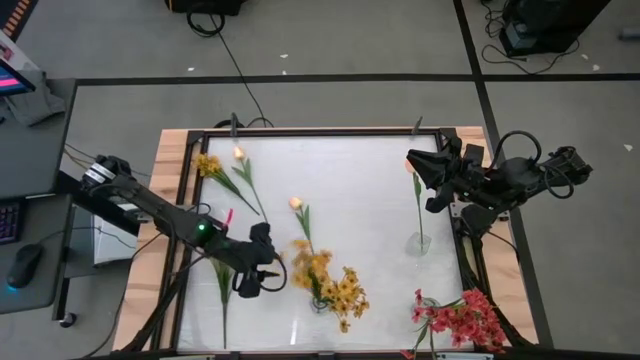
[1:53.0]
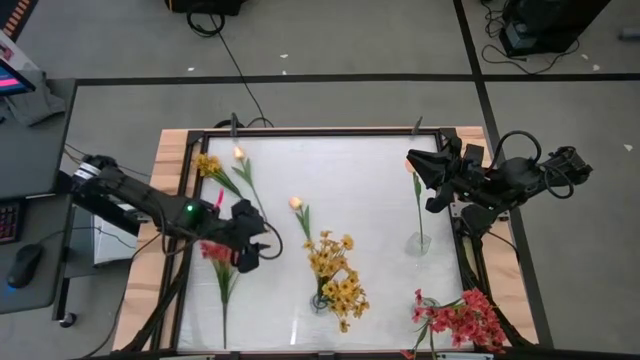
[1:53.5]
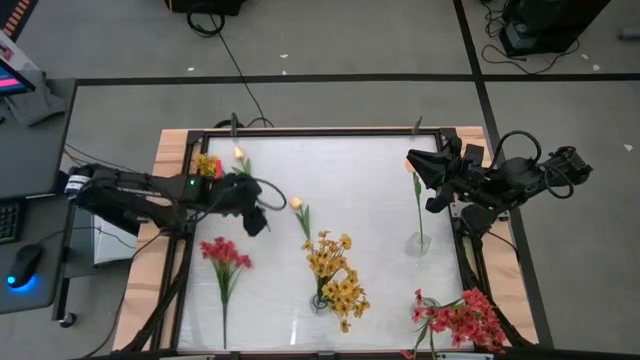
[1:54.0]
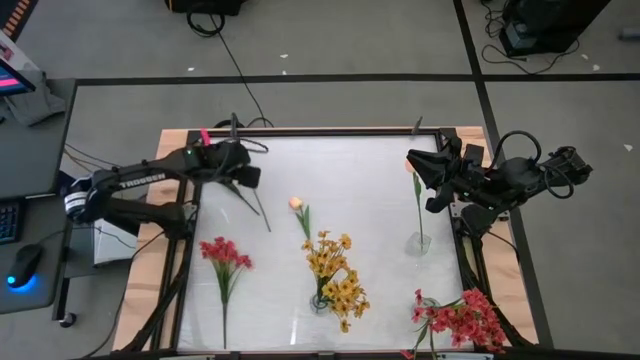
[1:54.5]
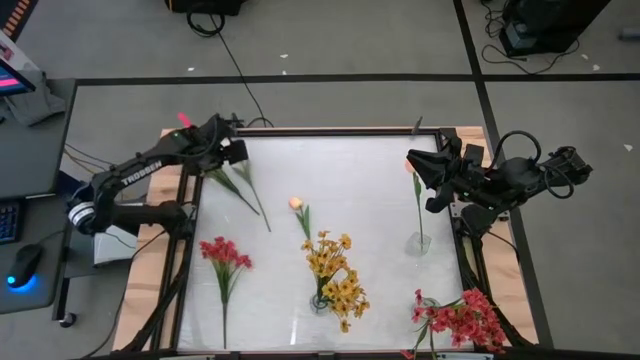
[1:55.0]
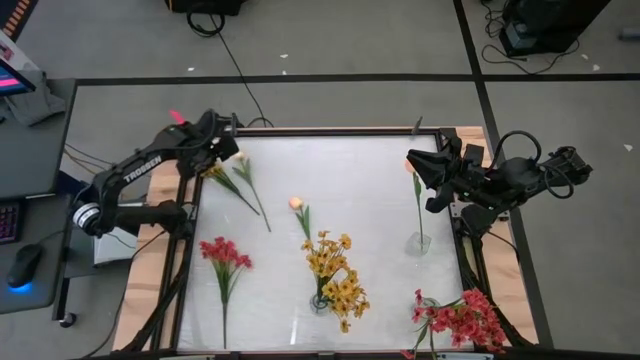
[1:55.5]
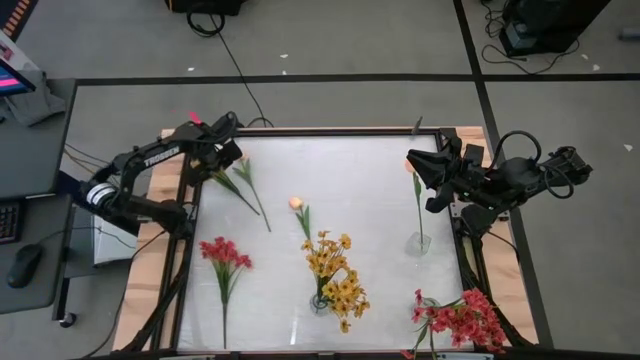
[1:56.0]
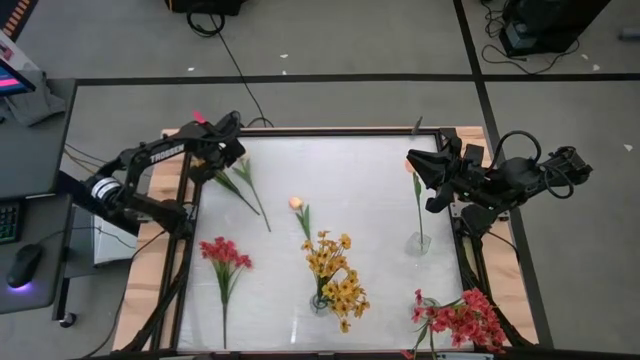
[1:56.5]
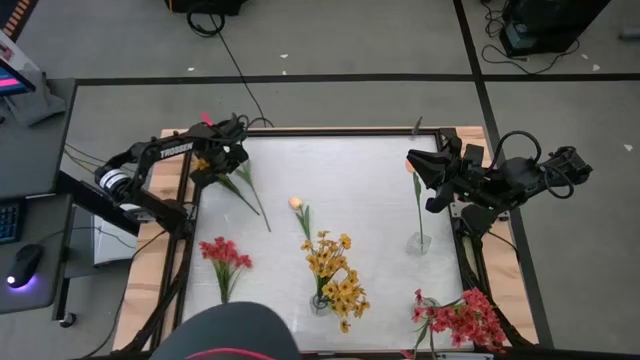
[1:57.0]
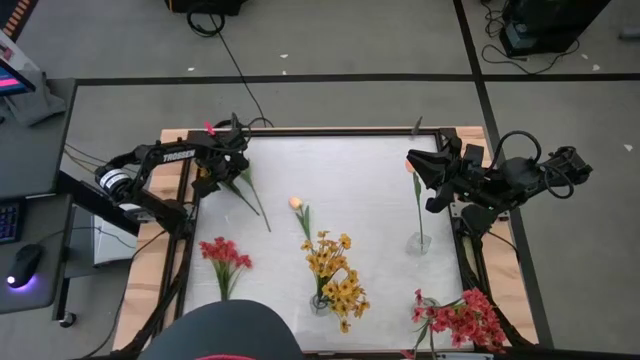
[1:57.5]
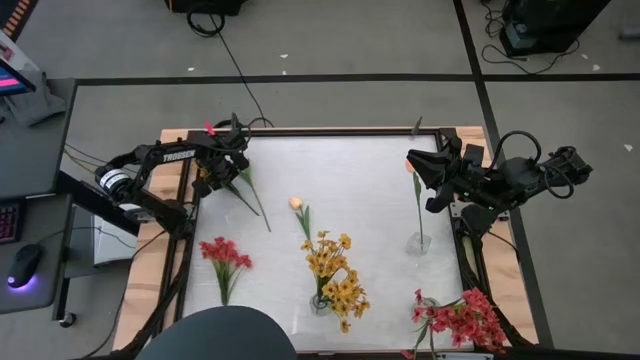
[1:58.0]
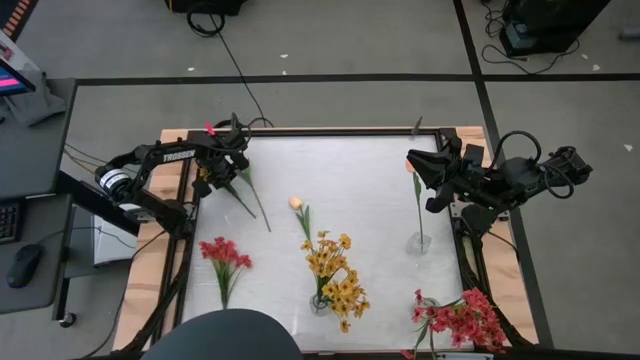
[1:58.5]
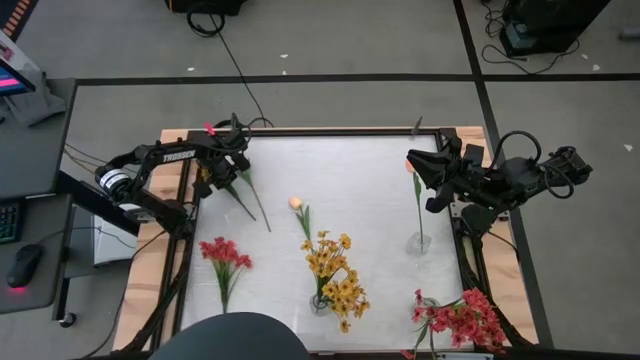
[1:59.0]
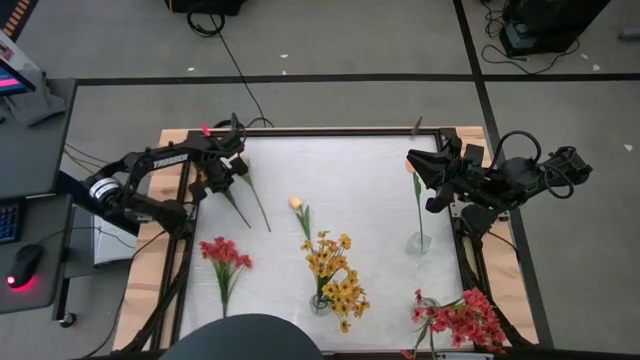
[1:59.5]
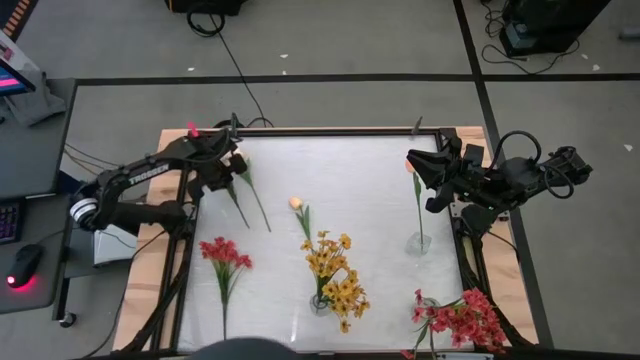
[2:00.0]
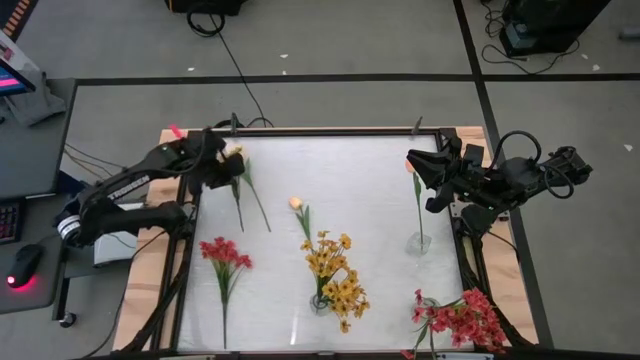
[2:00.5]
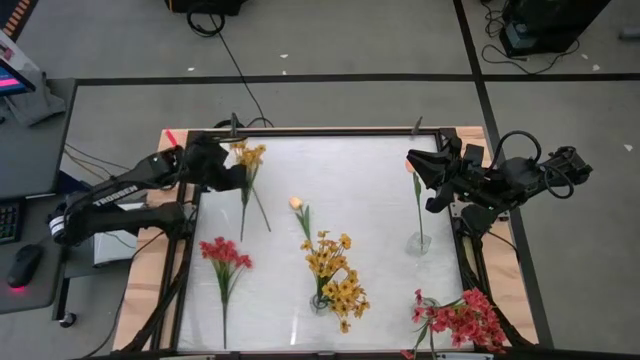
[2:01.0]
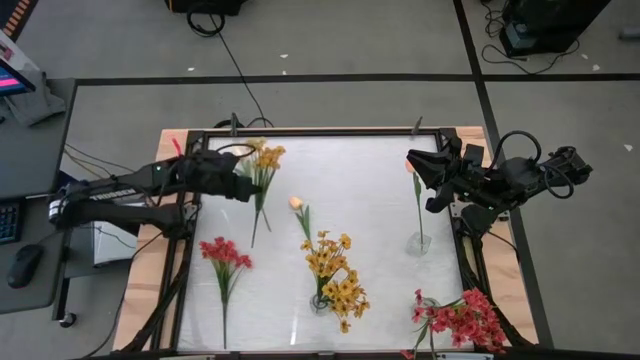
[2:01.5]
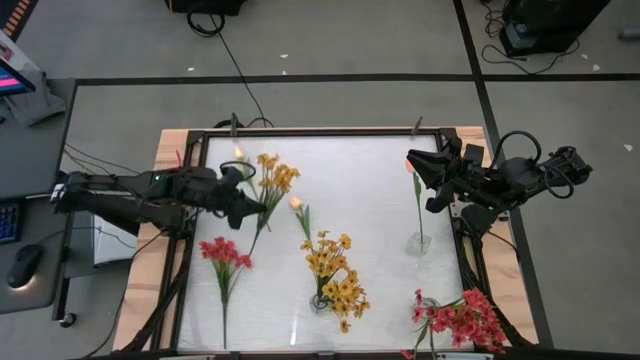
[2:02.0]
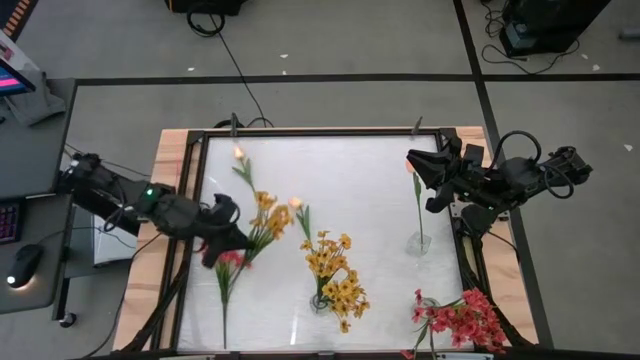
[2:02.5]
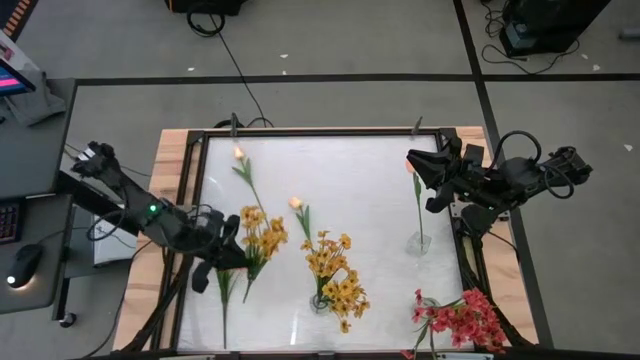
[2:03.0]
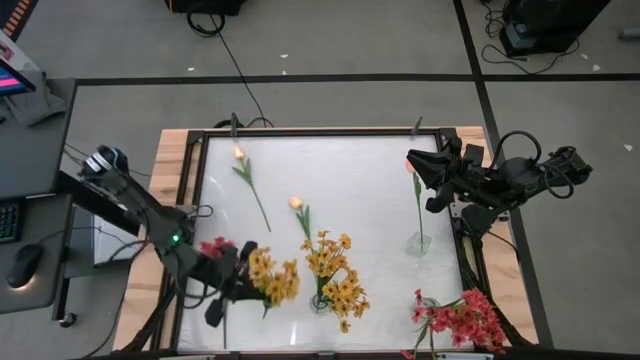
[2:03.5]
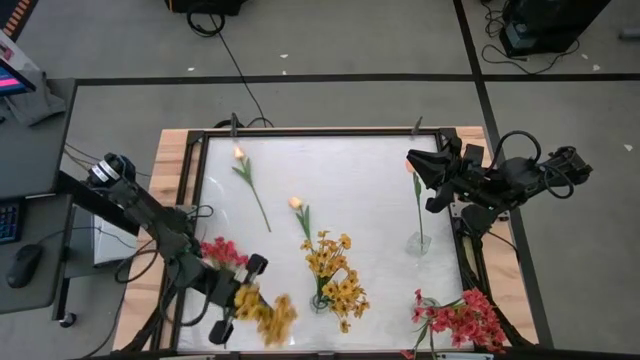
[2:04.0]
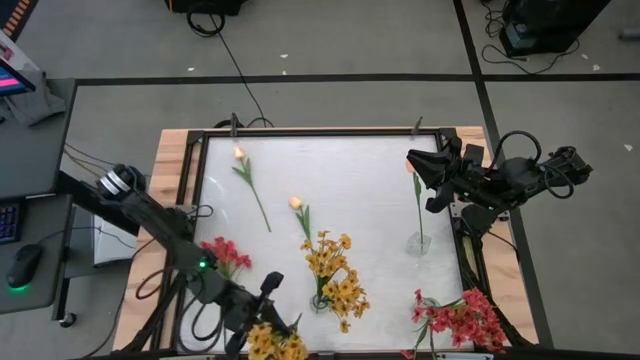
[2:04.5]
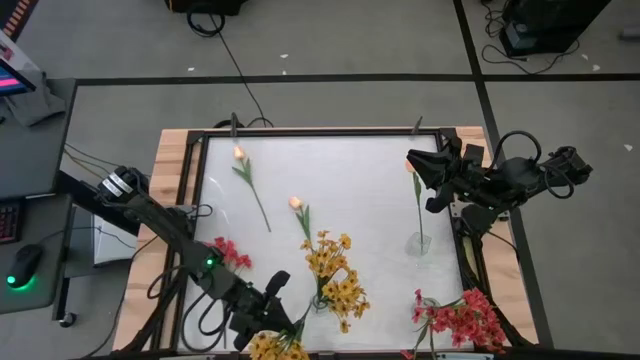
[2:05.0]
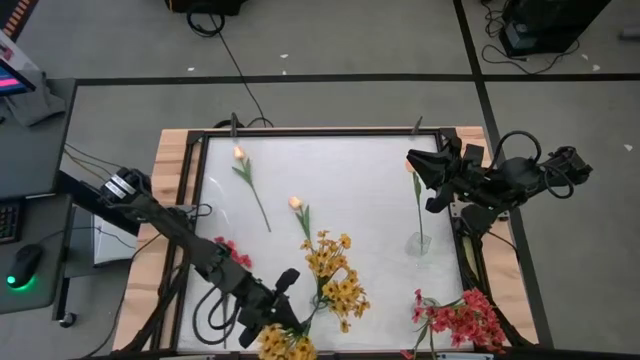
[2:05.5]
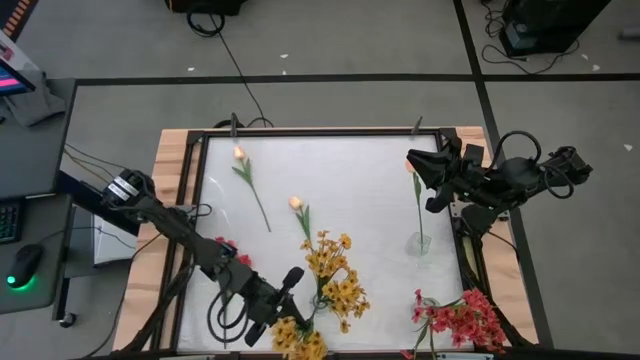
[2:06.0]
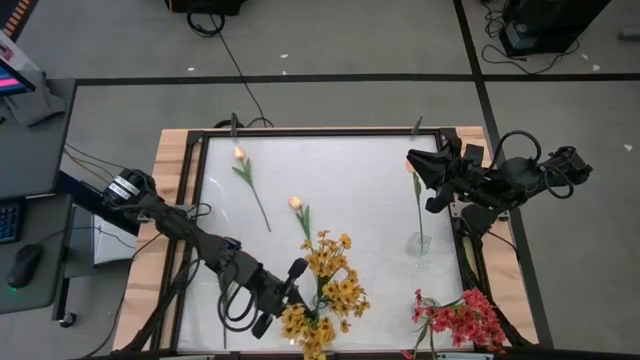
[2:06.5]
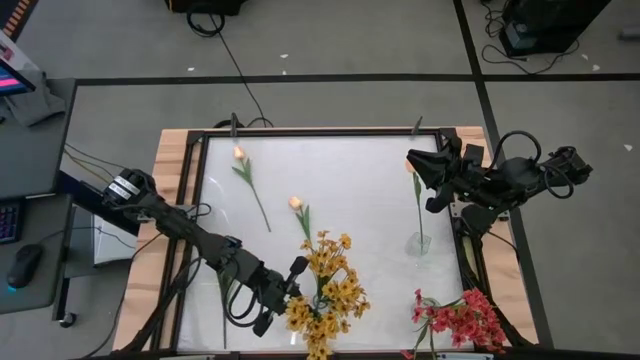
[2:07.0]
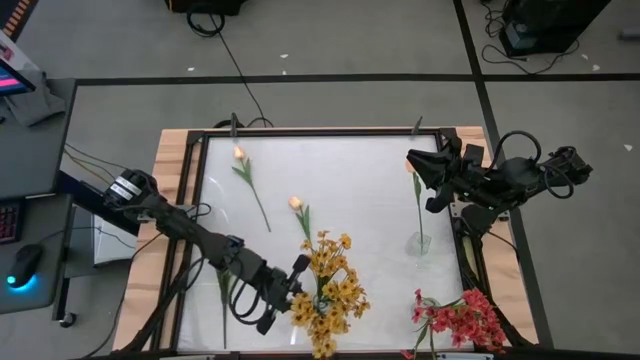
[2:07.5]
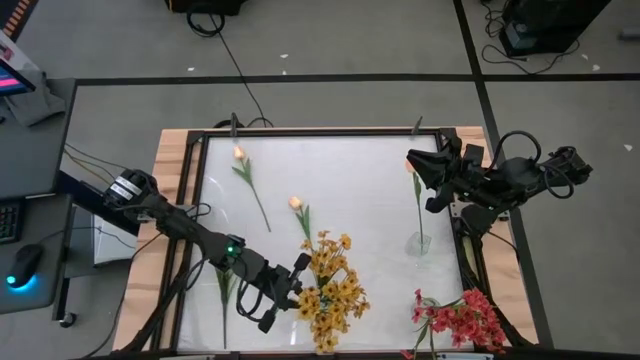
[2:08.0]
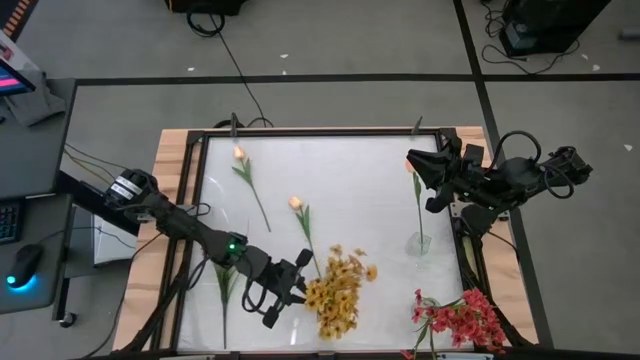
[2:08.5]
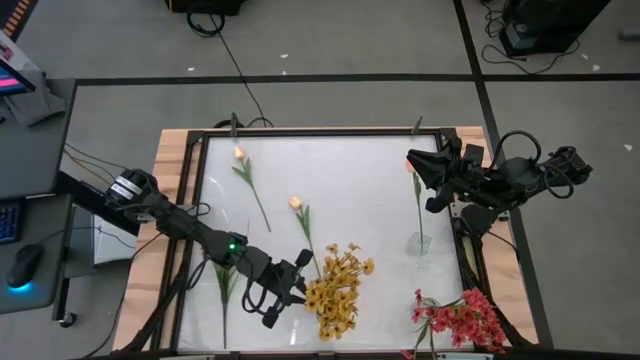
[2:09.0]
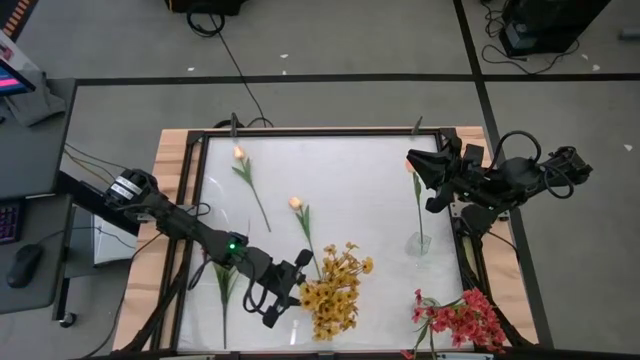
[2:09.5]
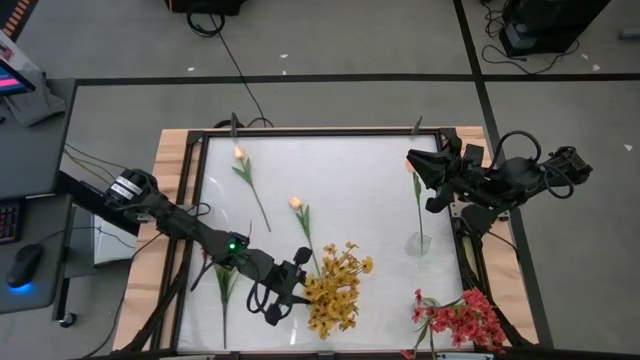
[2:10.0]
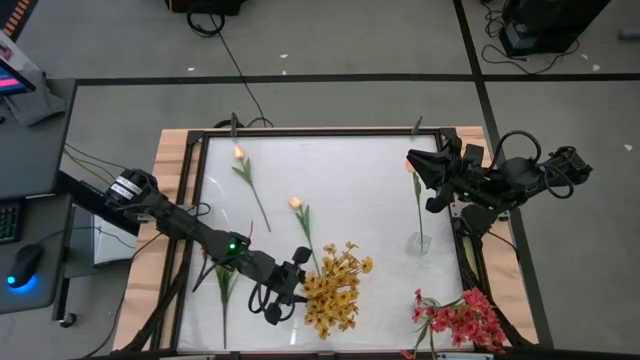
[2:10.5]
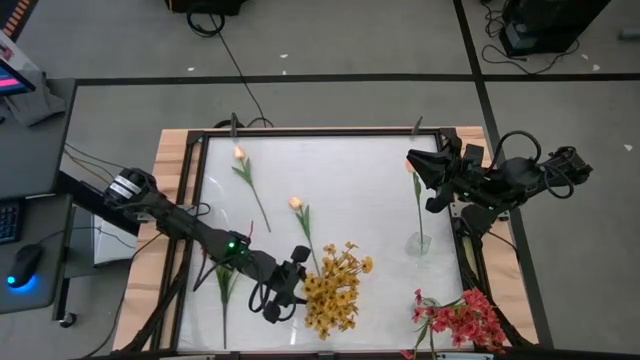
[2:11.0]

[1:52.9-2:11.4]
Task: Sort flowers into vase by color
Put the yellow flower into the left transparent vase

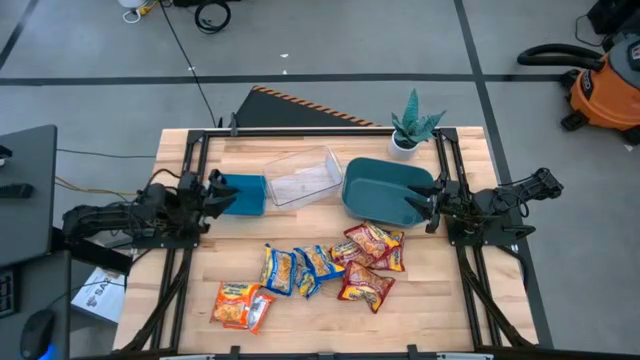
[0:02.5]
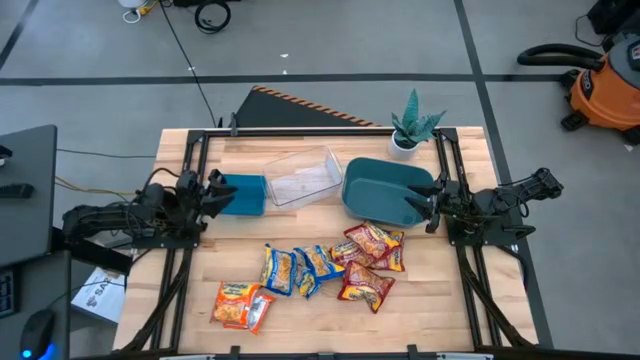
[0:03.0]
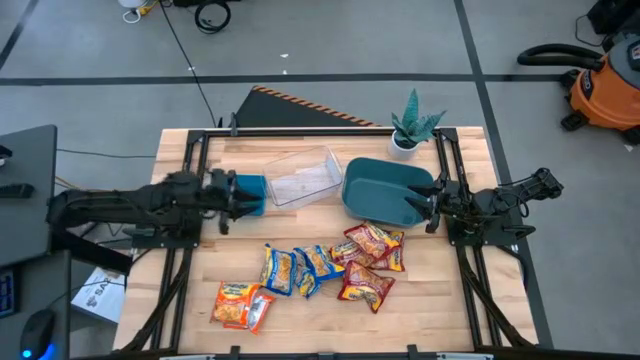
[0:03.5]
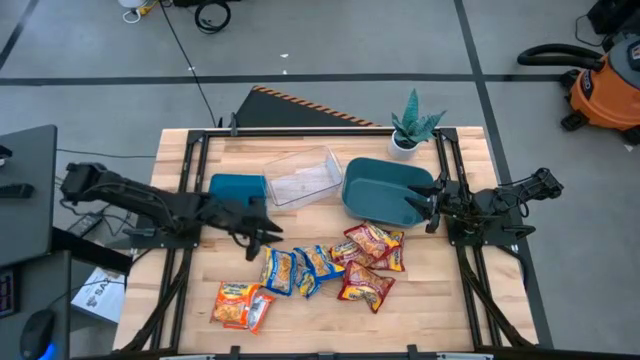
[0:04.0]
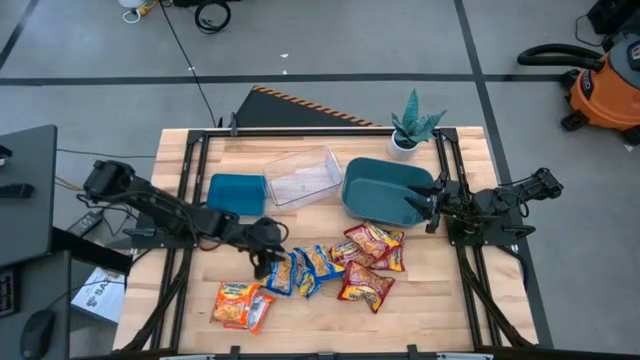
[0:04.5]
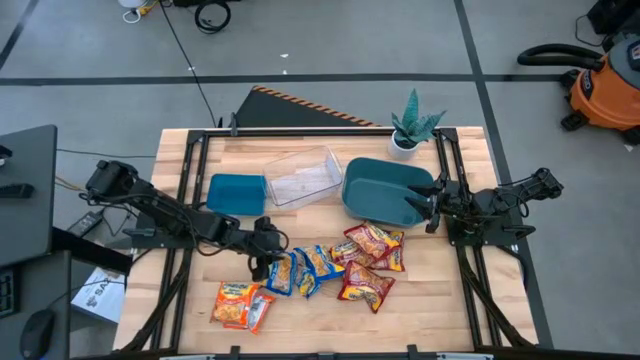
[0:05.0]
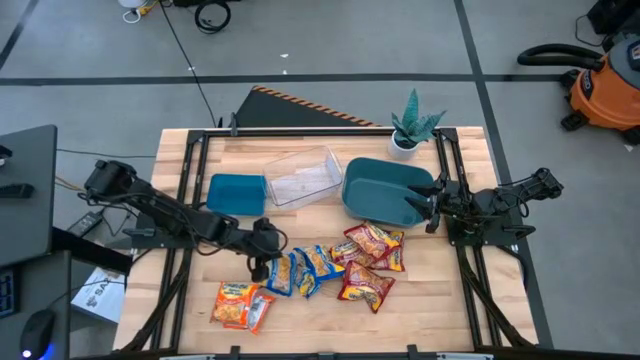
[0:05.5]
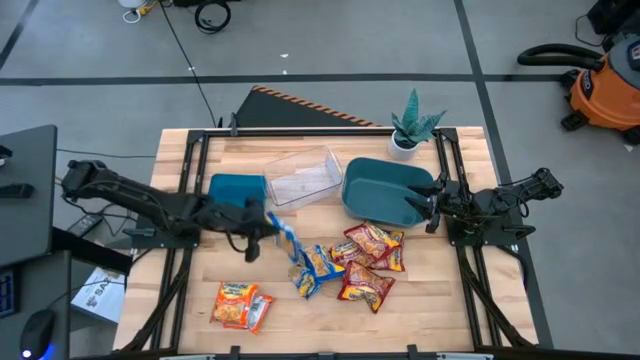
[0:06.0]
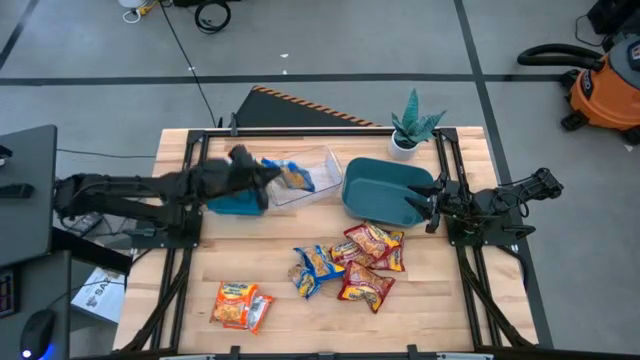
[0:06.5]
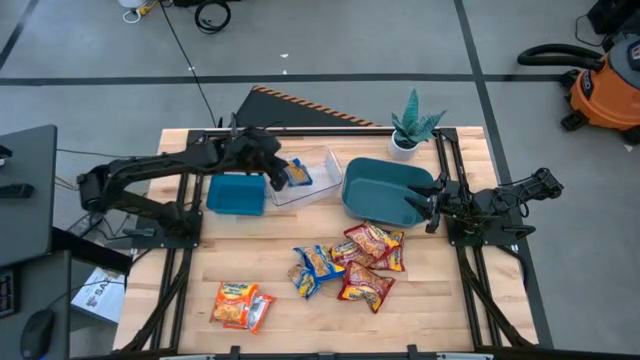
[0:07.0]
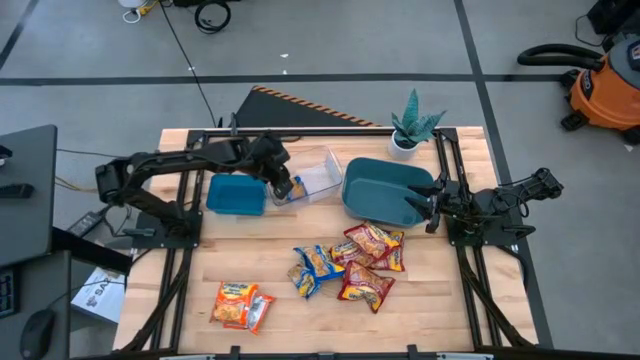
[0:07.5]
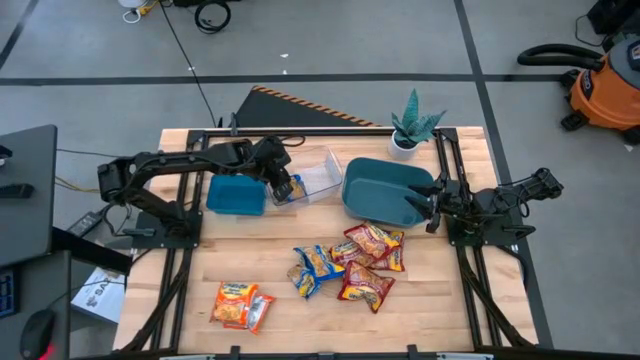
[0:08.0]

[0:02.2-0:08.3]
Task: Sort Maruchan noodles
Put the blue noodle pack into the transparent bin
